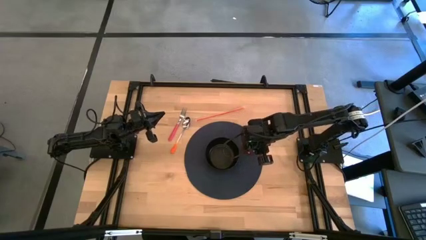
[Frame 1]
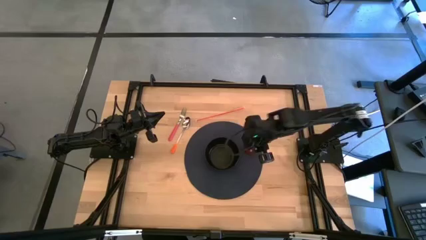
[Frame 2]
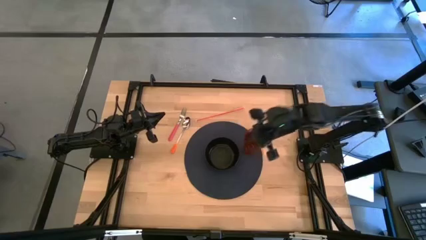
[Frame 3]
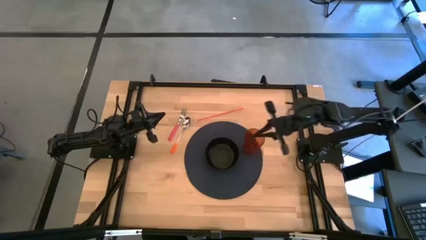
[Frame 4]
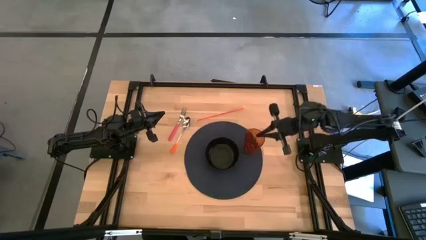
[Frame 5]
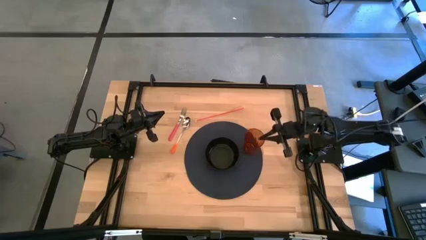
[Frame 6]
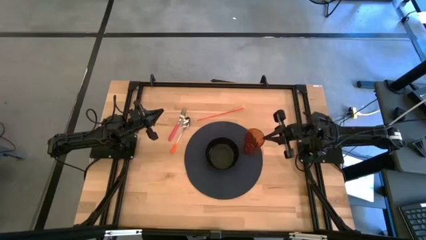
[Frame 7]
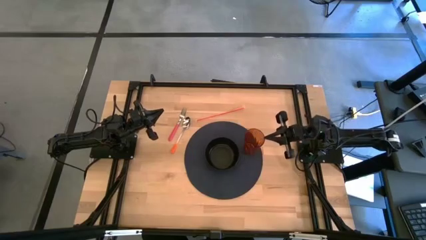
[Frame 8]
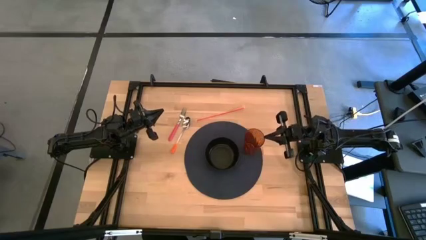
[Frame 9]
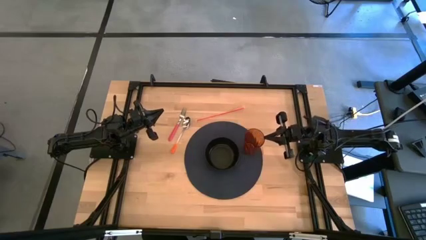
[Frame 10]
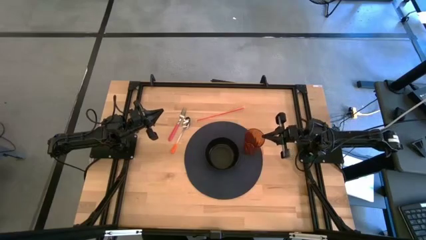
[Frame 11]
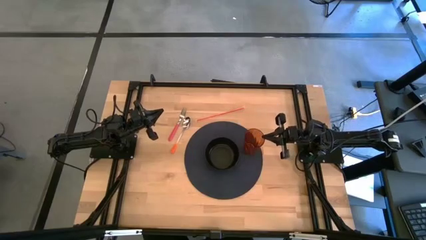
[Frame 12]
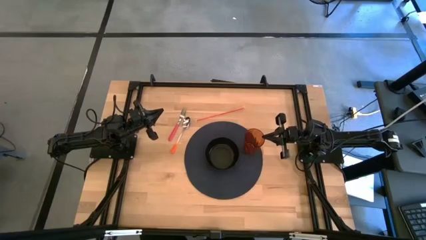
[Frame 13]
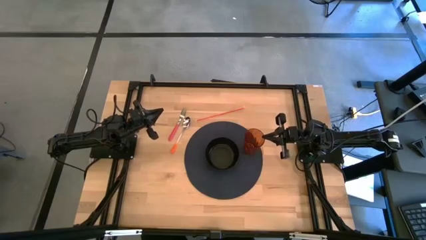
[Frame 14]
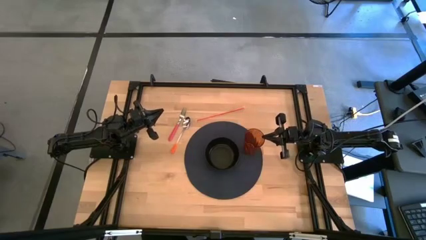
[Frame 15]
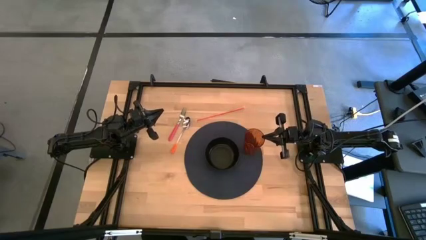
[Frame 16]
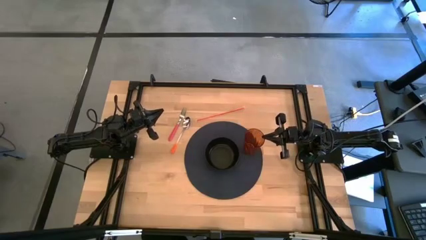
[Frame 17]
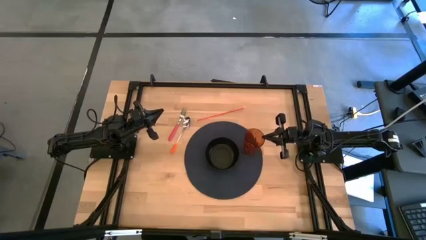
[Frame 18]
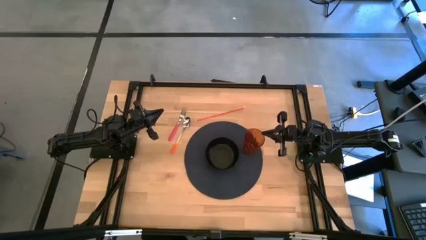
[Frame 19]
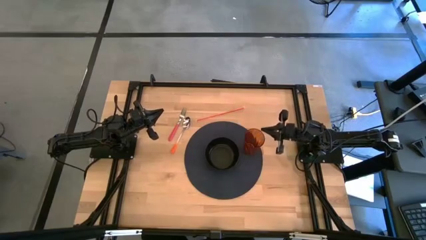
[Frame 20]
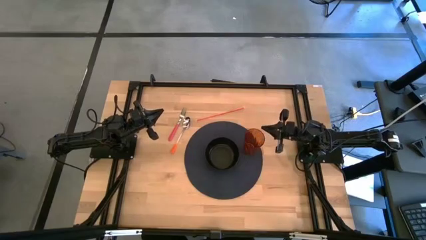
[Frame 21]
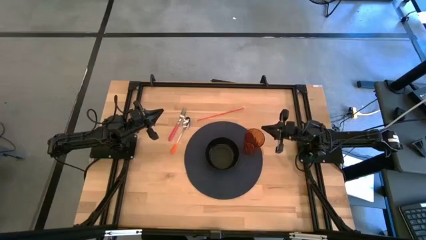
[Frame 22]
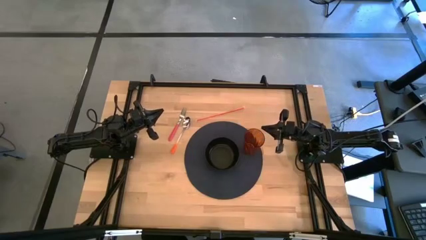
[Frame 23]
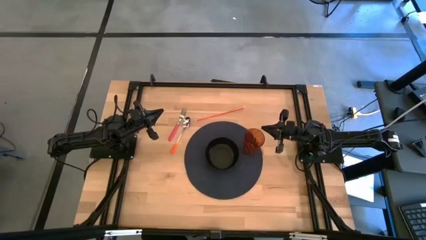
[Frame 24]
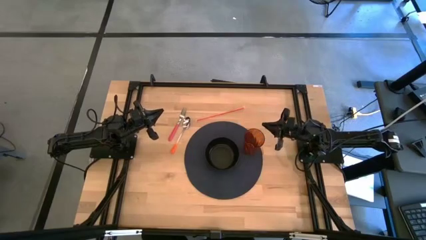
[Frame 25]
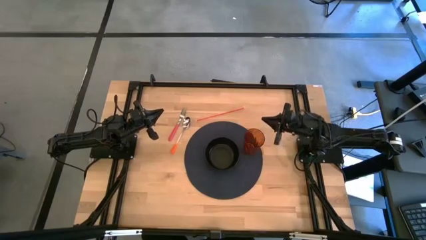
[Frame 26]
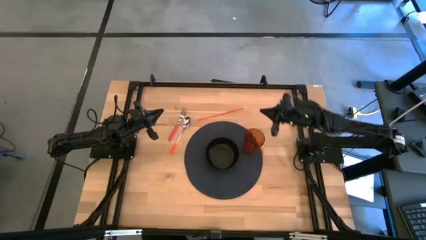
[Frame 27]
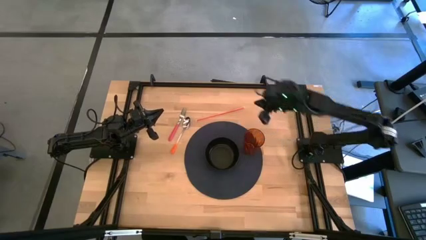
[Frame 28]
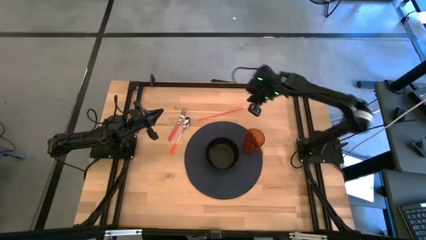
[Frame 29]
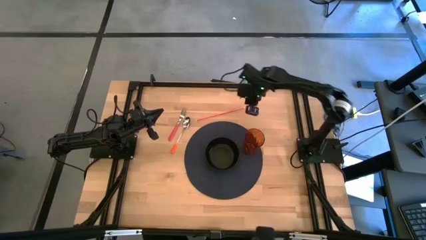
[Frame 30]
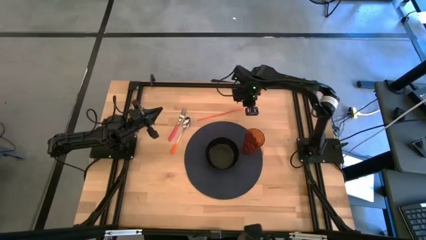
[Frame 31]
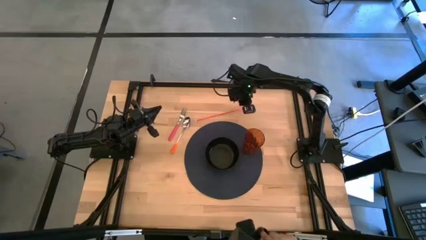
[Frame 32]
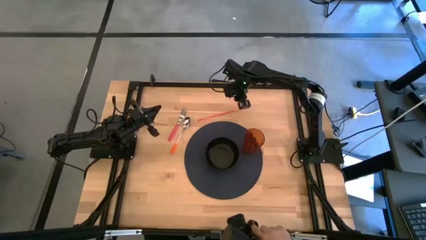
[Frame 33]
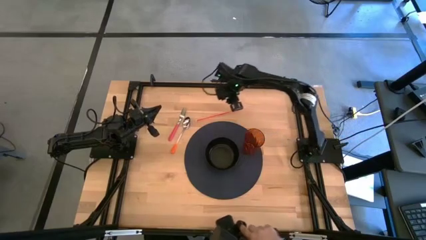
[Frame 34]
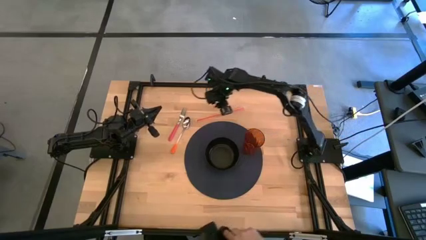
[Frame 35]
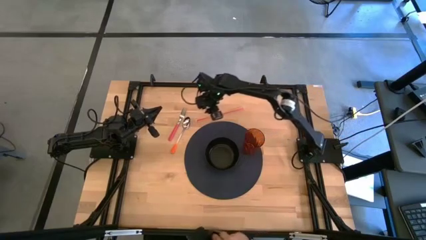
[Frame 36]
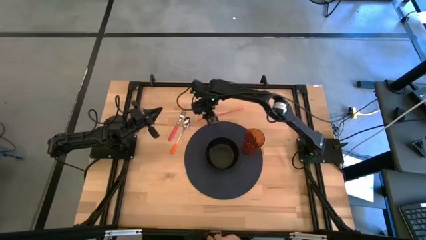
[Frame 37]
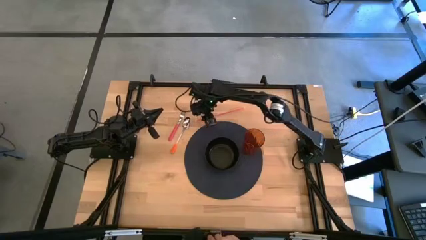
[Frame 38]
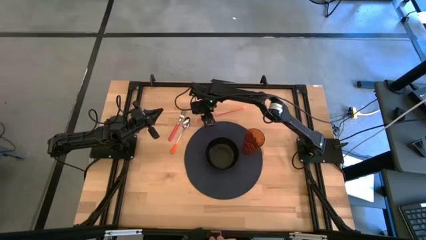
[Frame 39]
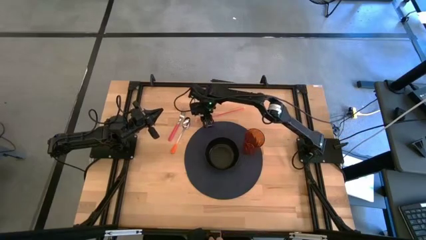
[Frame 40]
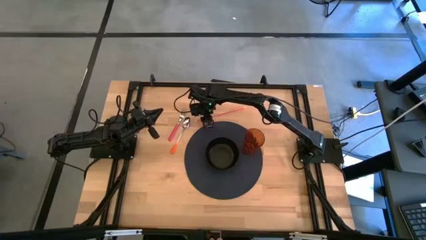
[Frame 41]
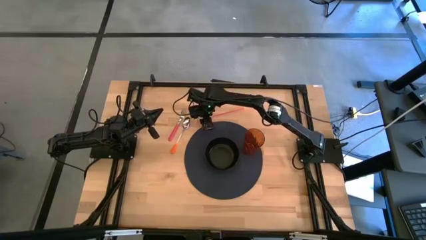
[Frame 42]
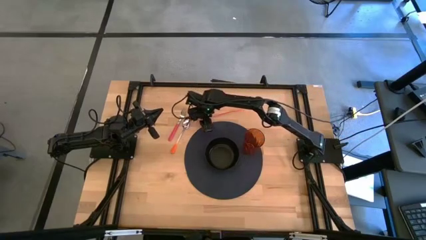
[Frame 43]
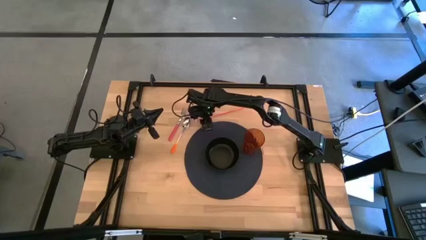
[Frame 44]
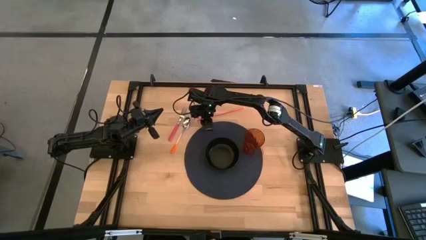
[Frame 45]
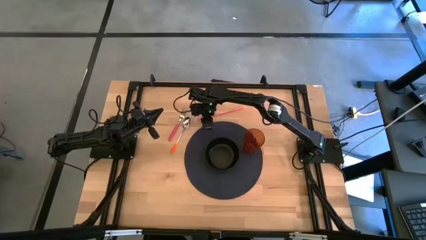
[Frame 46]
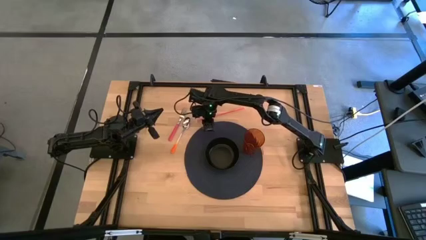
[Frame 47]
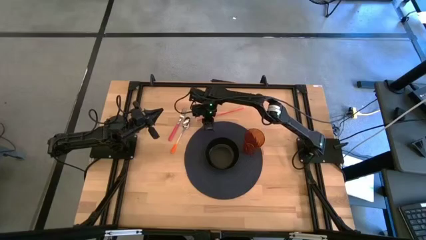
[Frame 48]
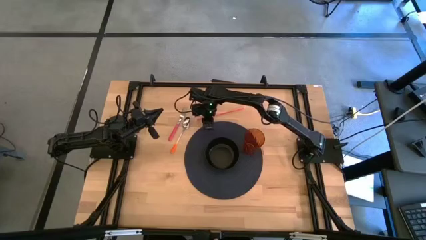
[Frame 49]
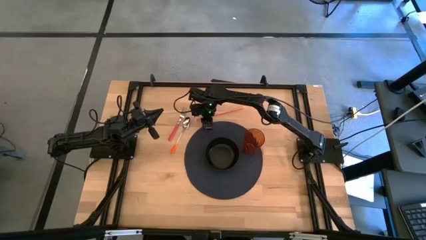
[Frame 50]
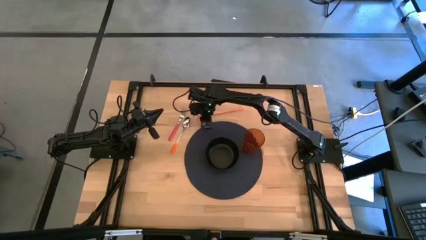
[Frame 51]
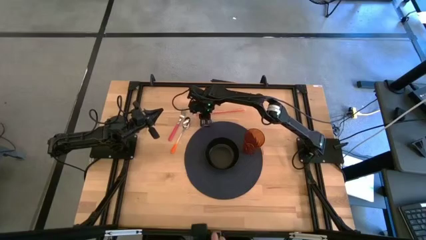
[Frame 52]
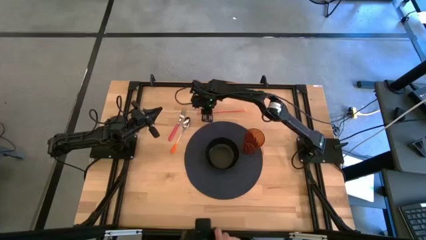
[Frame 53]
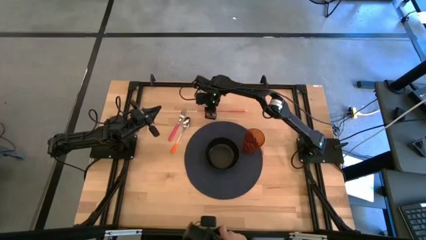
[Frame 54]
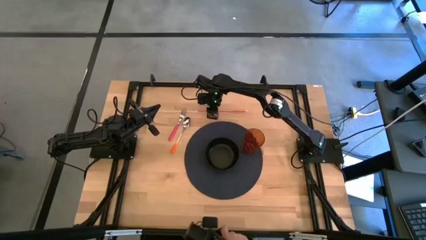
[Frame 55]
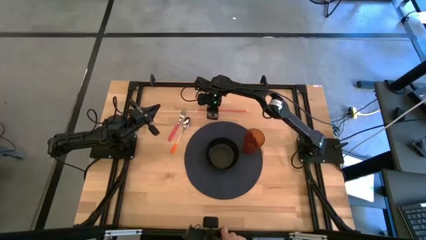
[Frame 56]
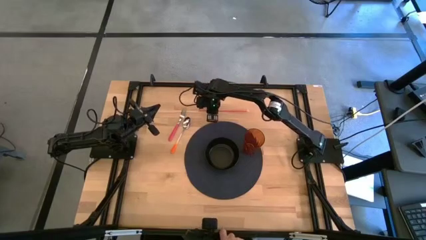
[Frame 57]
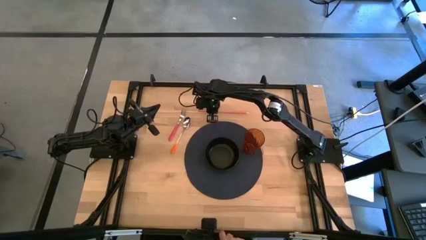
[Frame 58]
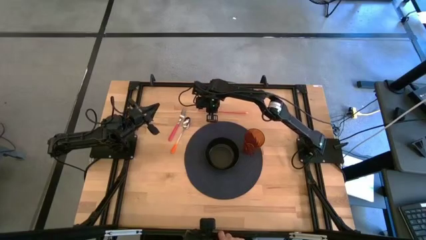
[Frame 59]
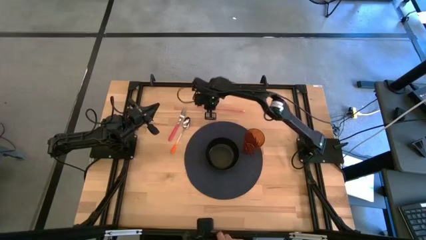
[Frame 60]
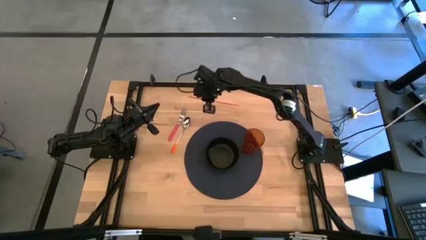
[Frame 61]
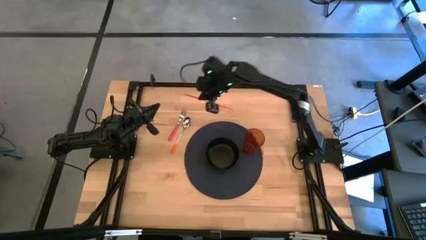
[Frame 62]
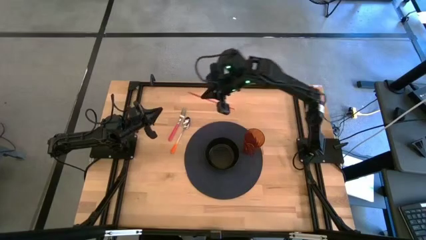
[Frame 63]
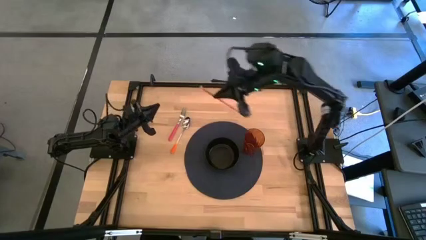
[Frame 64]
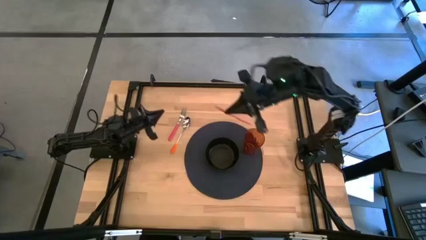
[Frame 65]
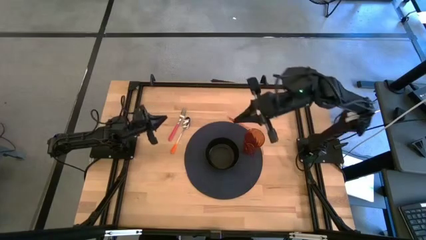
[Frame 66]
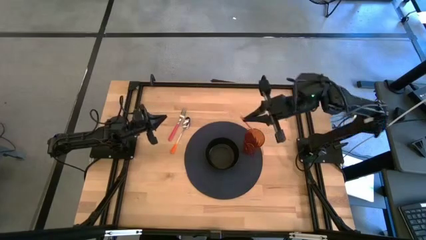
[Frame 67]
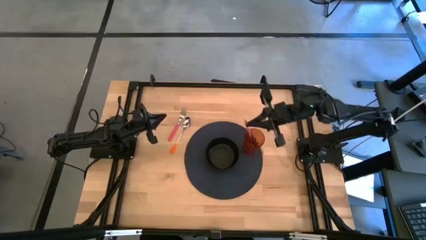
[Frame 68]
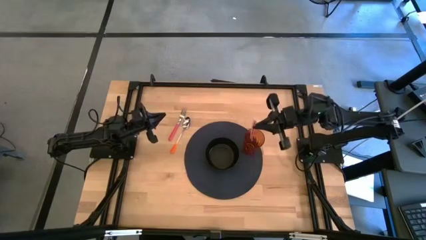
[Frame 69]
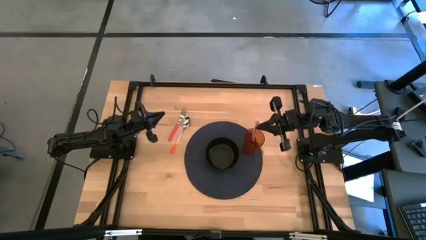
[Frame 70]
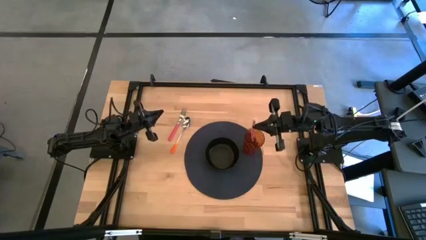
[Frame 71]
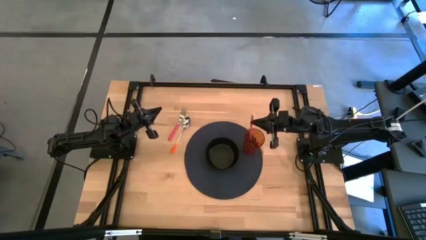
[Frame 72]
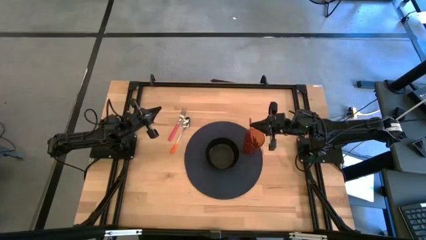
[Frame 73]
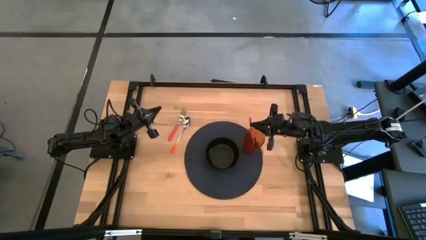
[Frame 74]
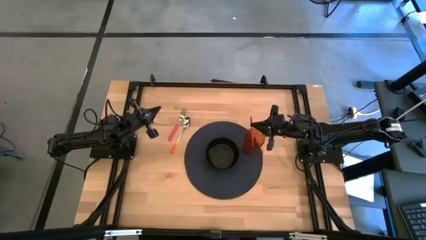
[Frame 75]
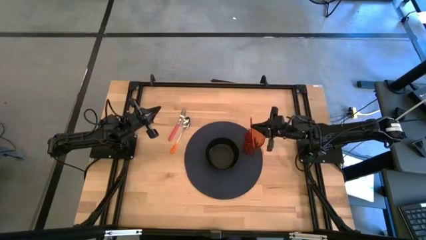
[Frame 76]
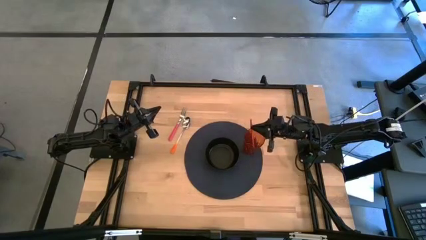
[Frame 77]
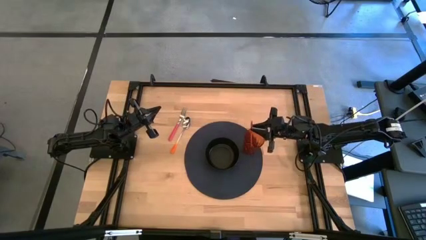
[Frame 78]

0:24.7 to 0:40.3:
Task: Pick & Place Utensil
Put the orange straw on the brown cup
